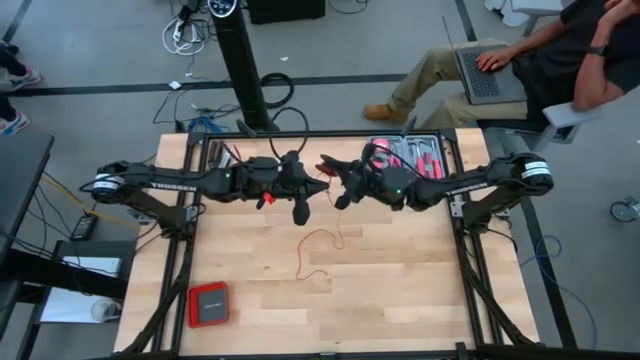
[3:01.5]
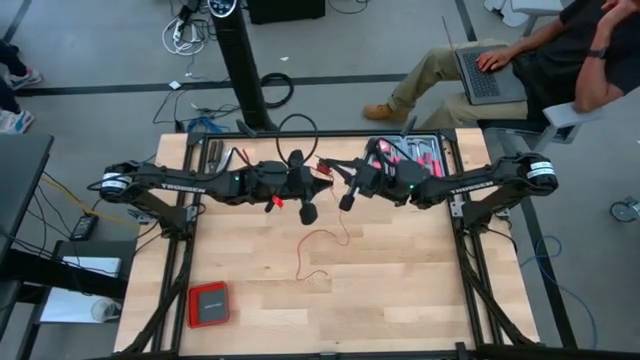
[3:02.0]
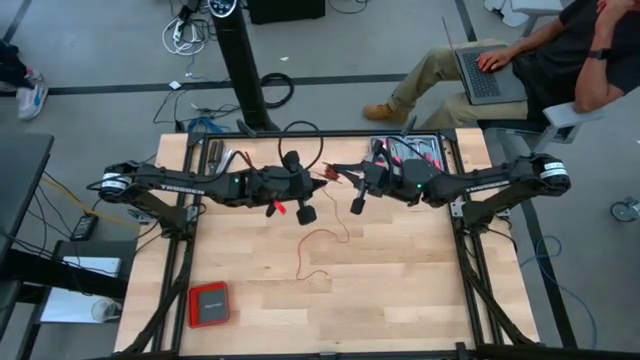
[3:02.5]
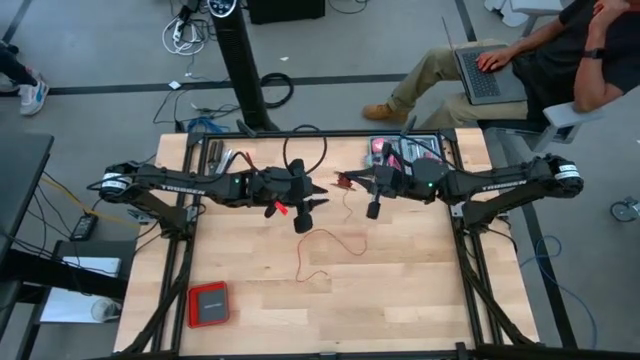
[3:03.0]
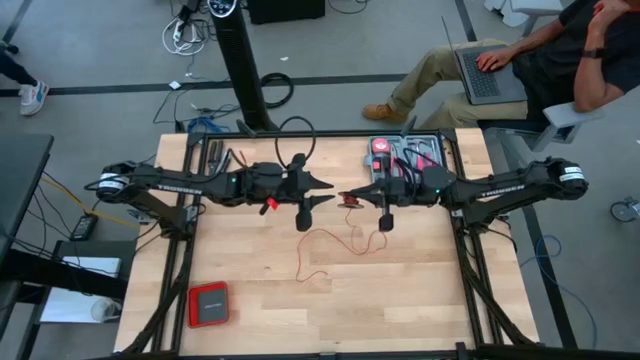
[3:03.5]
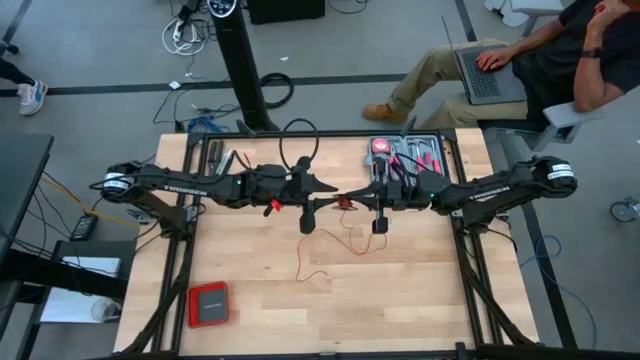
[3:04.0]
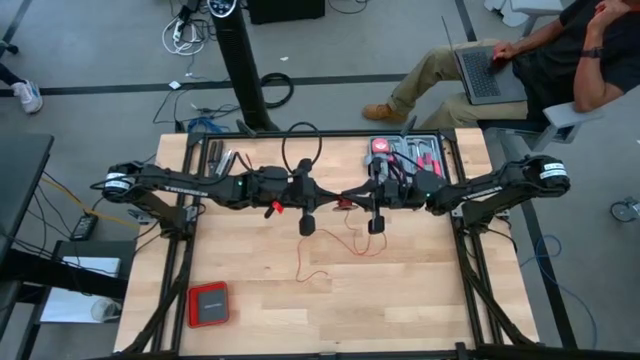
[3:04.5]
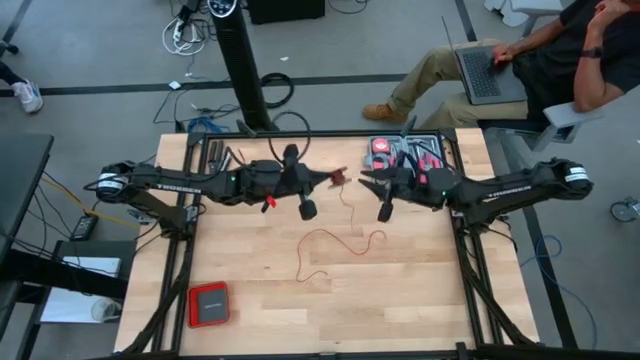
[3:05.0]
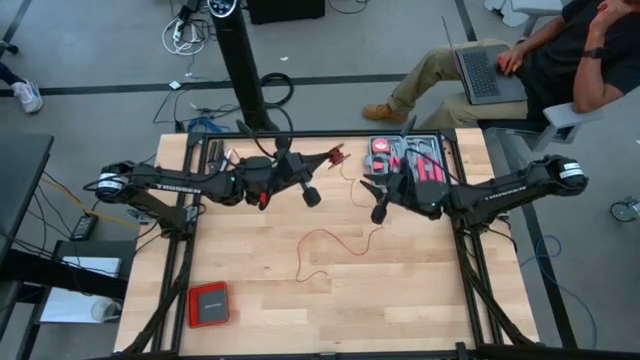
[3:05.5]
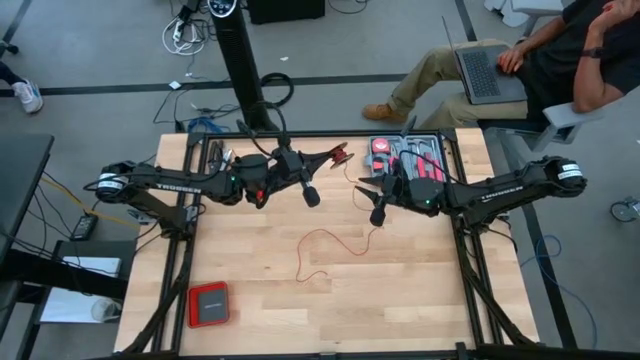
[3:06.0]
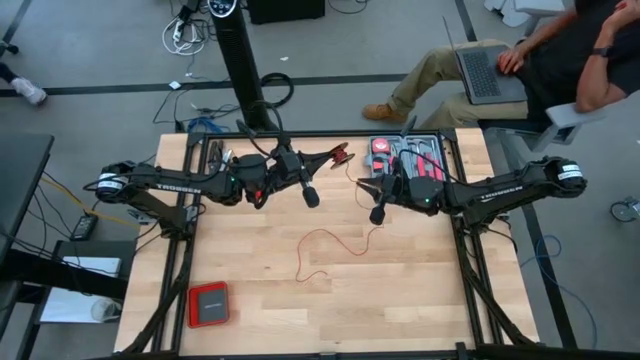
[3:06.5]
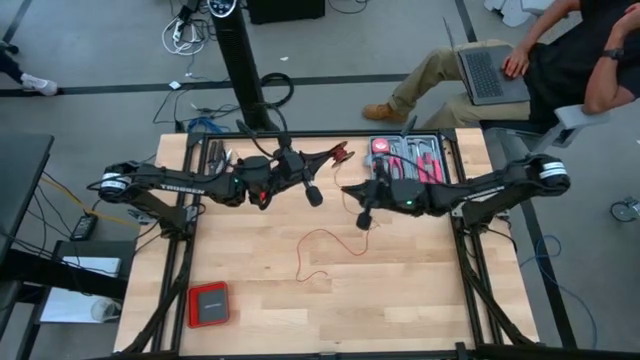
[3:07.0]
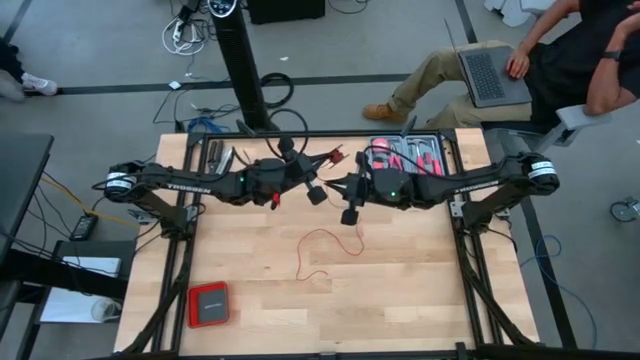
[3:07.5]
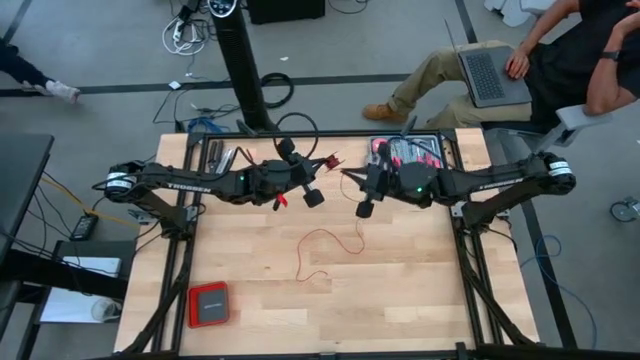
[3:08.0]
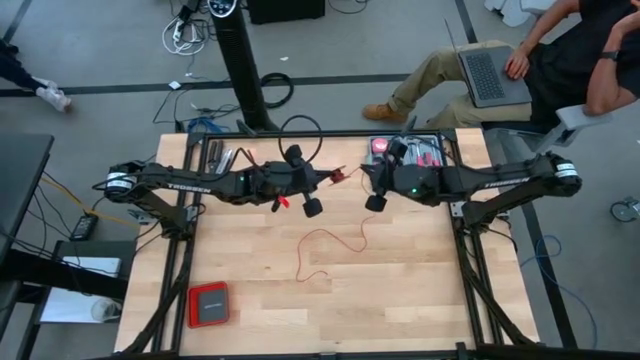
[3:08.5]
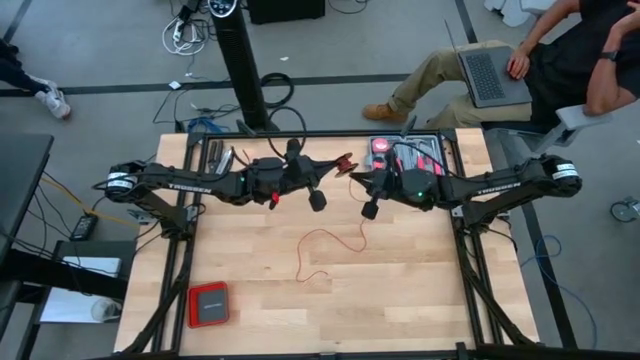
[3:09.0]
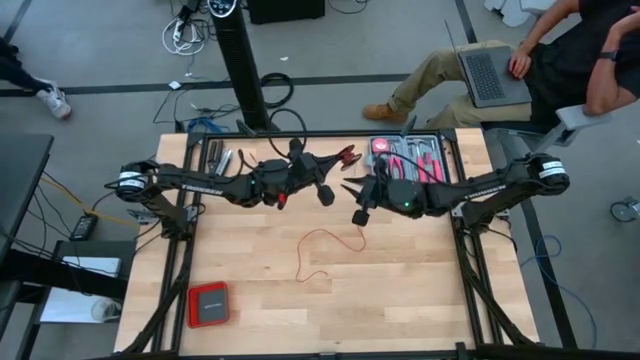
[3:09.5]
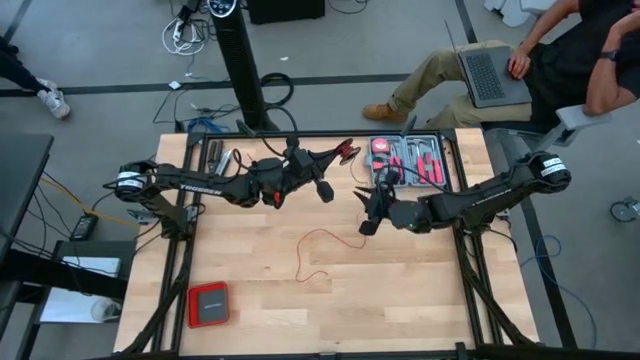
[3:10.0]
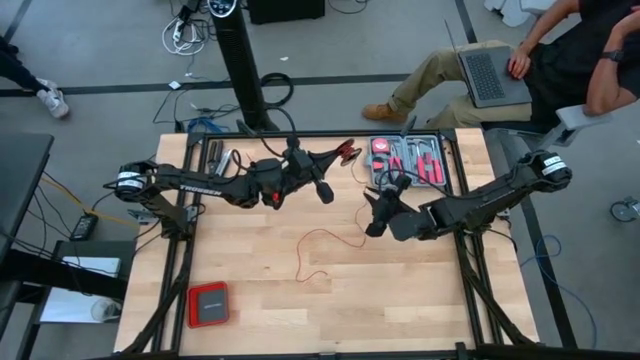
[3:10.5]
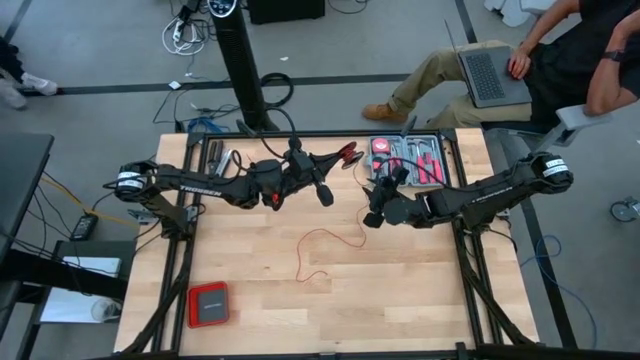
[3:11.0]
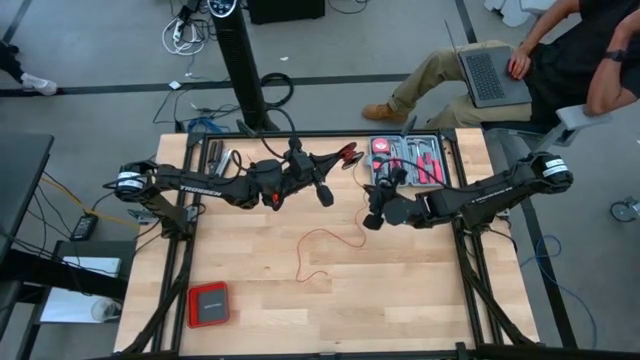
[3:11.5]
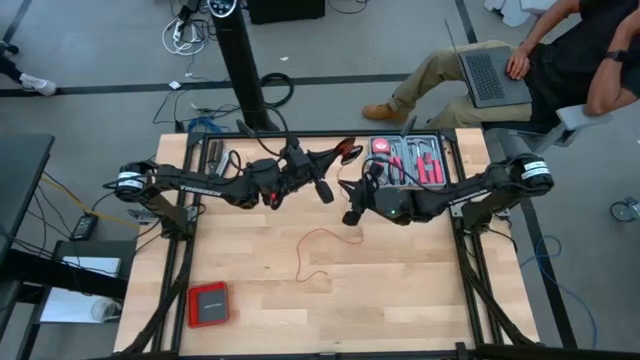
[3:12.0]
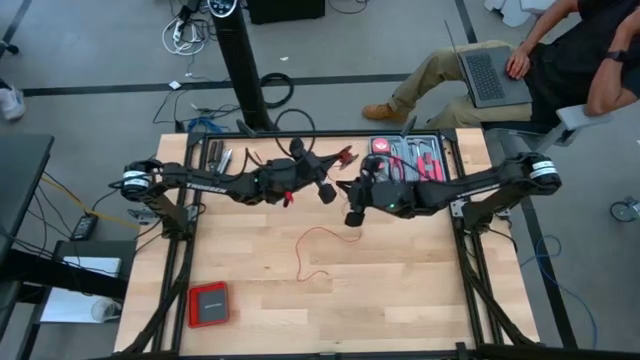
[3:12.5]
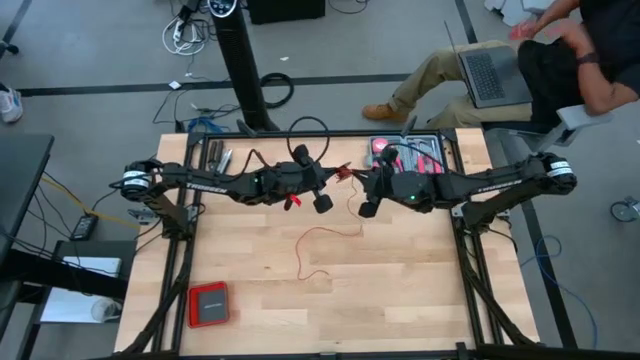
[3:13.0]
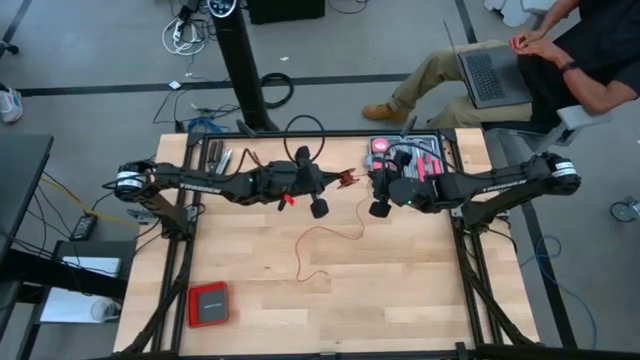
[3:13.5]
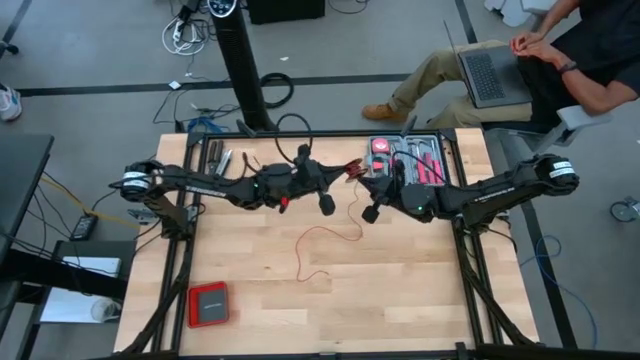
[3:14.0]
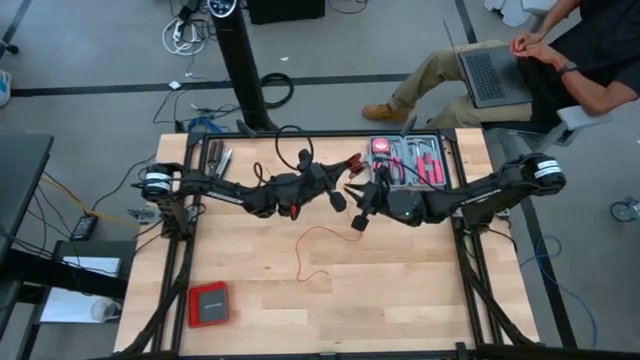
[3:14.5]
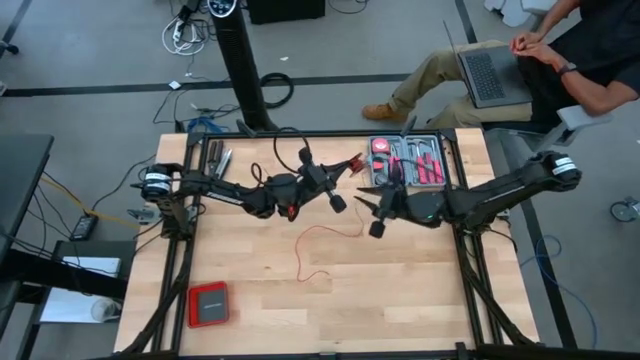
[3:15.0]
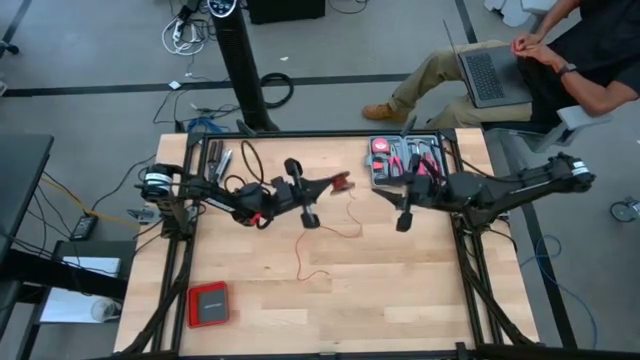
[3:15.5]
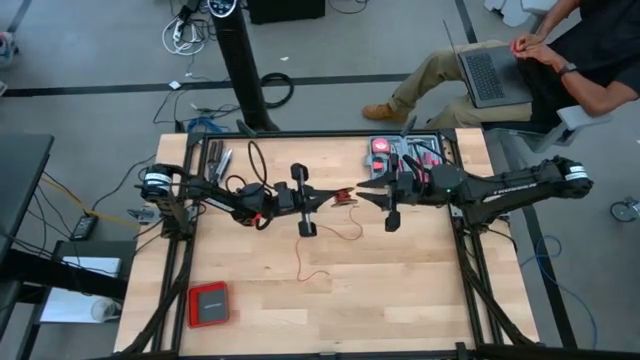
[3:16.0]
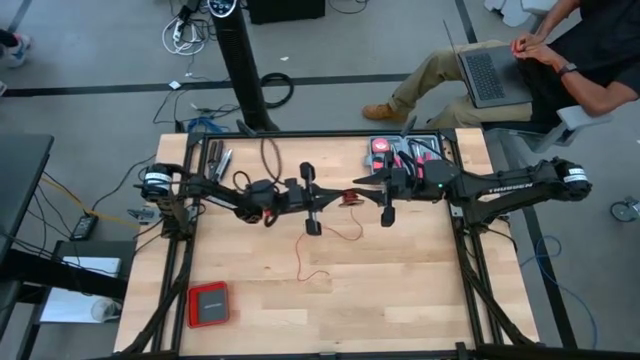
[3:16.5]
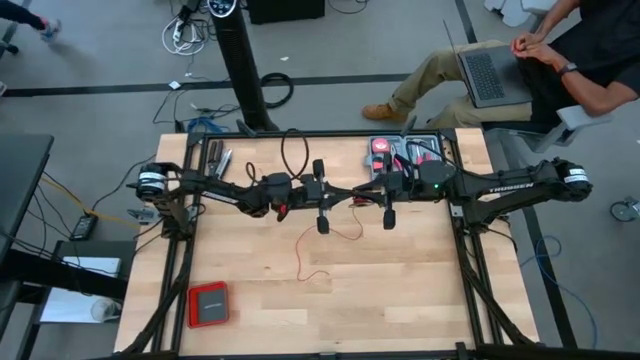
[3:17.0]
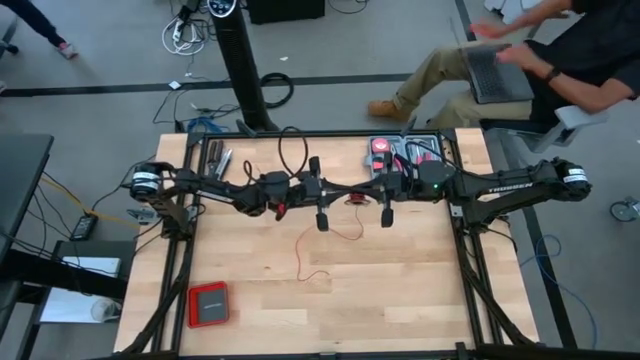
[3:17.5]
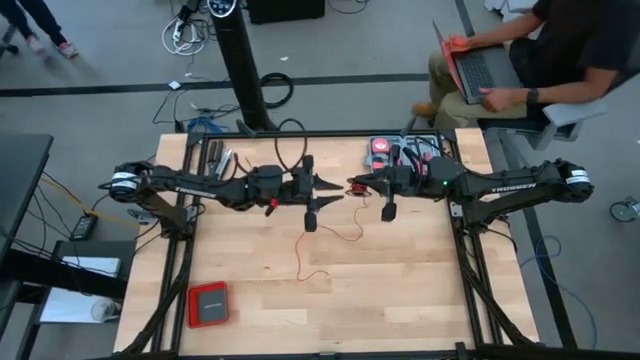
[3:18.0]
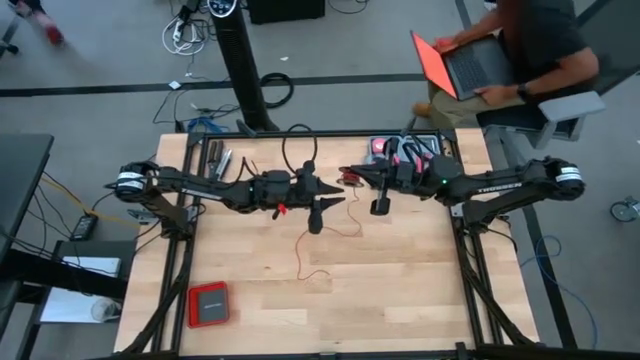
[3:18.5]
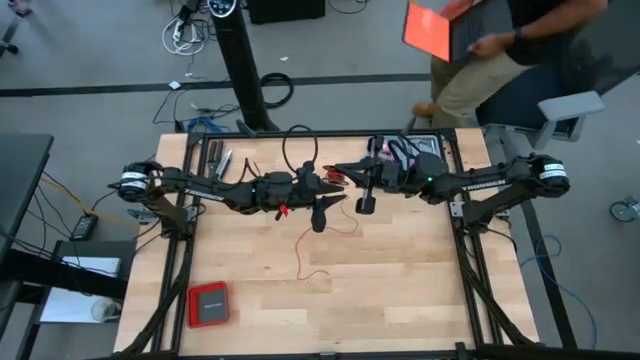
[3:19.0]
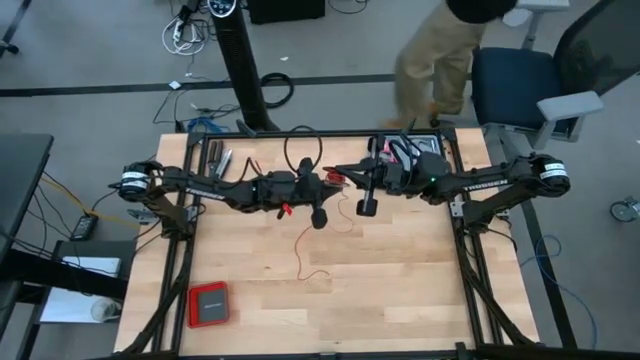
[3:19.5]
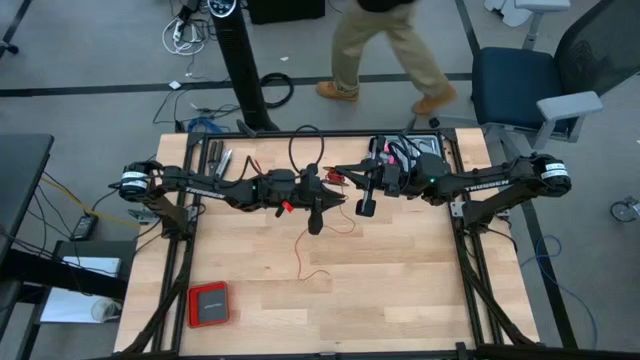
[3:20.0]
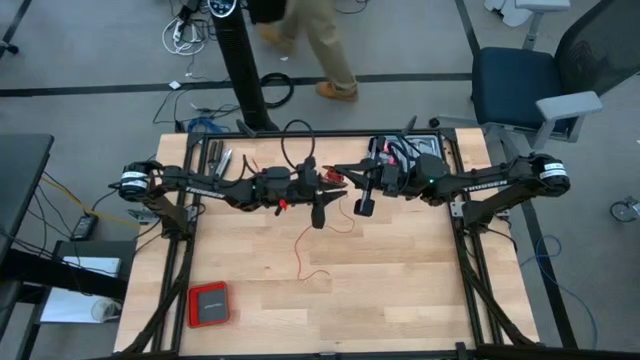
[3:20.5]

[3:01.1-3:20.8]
Task: Coil cords
Coil the red cable wire onto the black spool

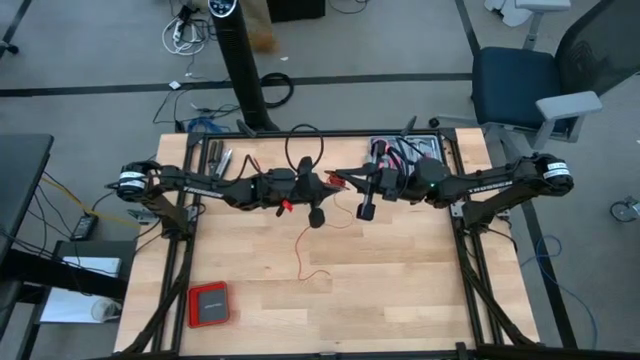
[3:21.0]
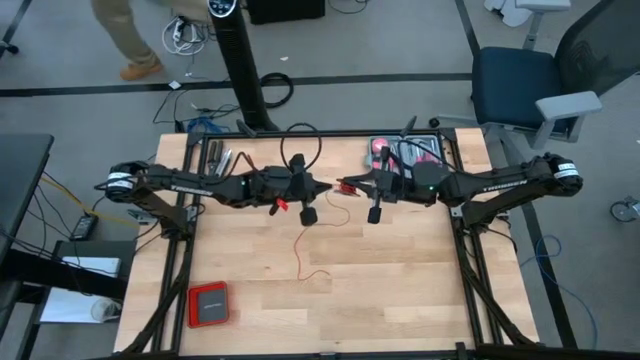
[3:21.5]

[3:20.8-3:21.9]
Coil the red cable wire onto the black spool

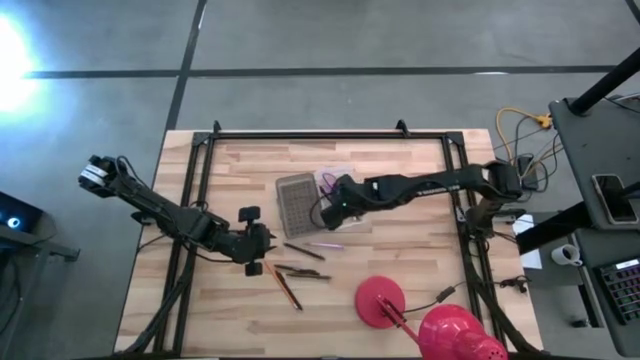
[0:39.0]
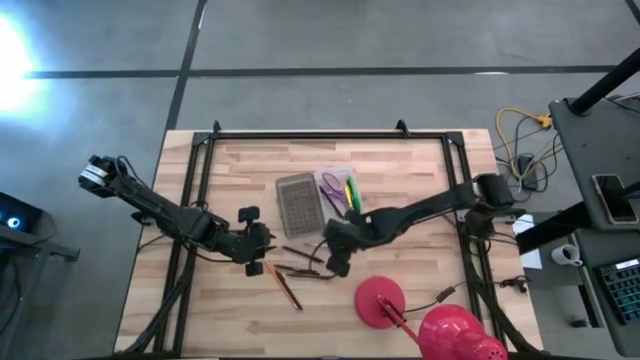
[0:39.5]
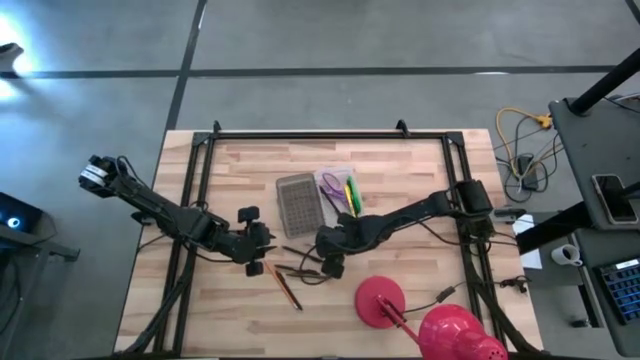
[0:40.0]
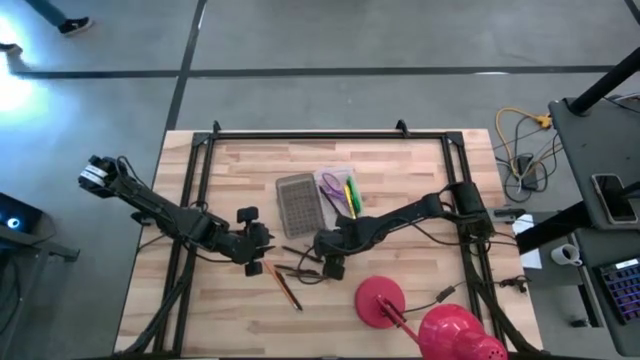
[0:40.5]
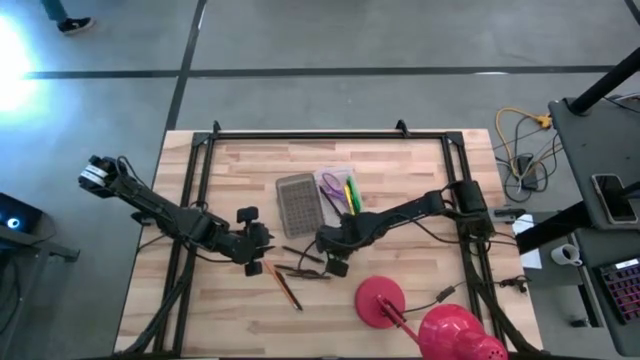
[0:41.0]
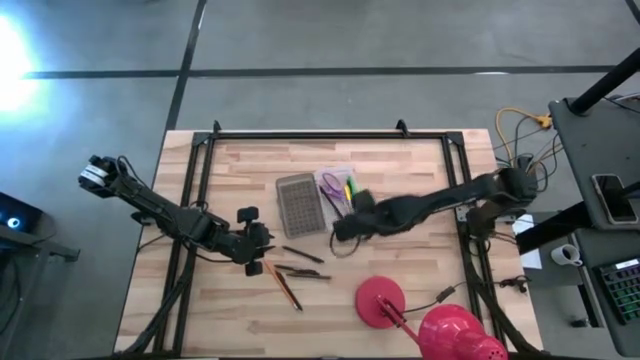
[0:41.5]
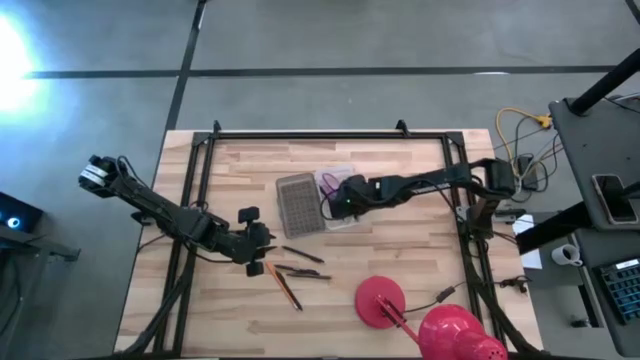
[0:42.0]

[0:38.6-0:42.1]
Task: Pick & place school supplies into a supply box
Put the purple pen into the black supply box
